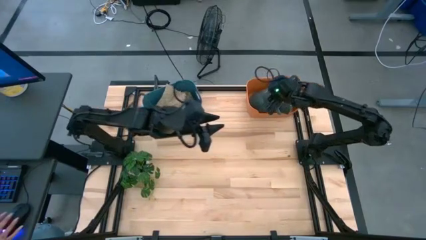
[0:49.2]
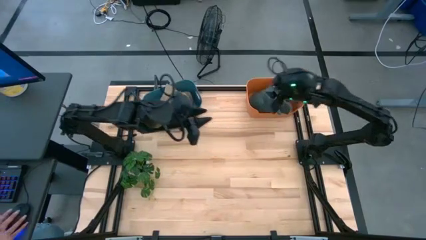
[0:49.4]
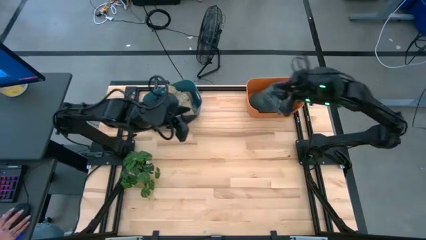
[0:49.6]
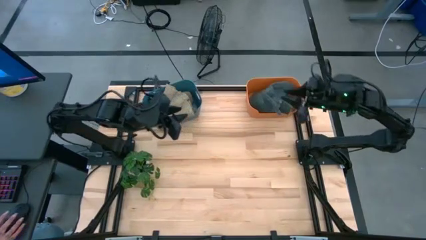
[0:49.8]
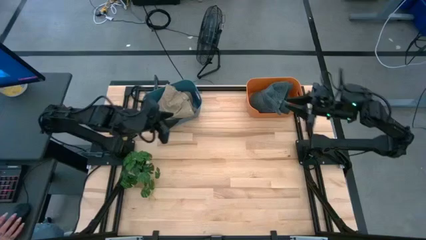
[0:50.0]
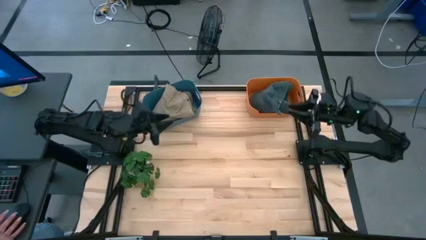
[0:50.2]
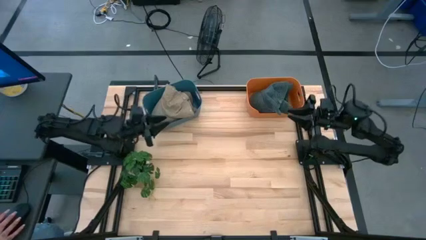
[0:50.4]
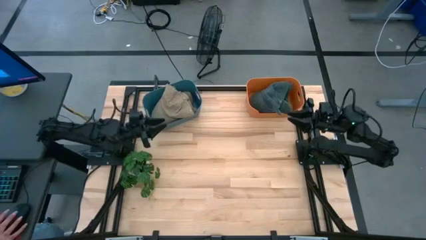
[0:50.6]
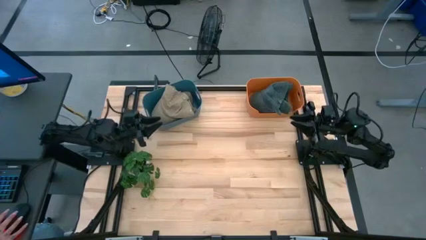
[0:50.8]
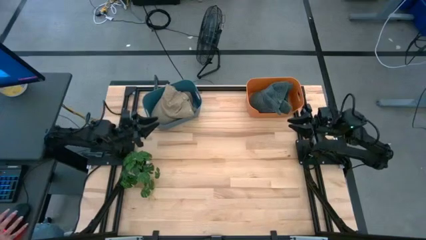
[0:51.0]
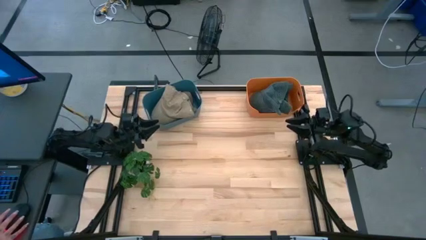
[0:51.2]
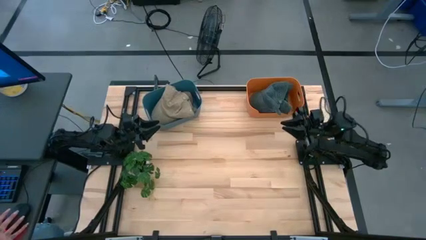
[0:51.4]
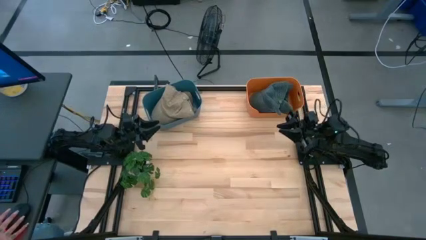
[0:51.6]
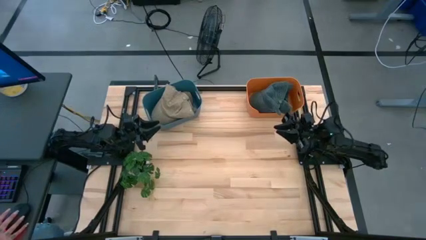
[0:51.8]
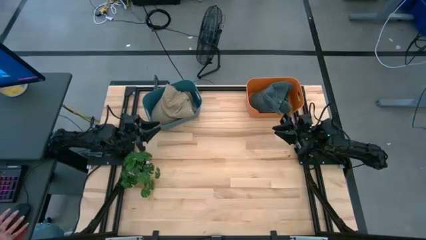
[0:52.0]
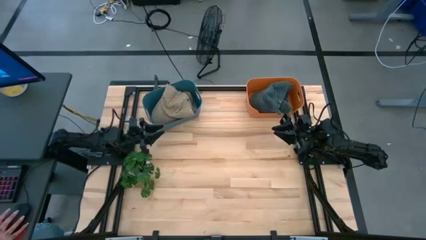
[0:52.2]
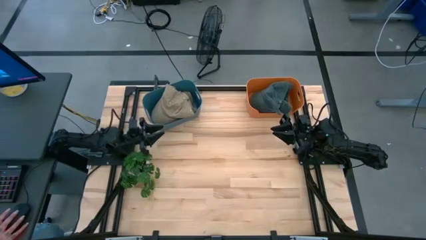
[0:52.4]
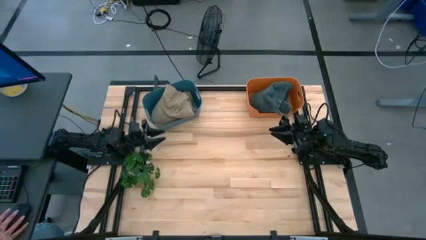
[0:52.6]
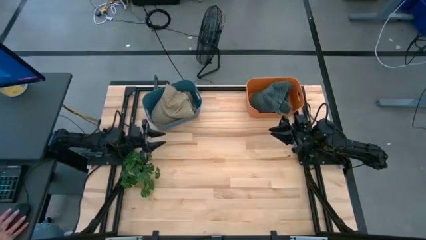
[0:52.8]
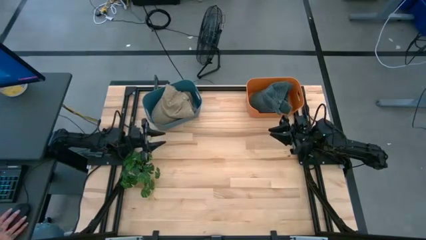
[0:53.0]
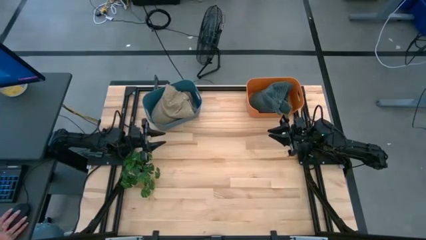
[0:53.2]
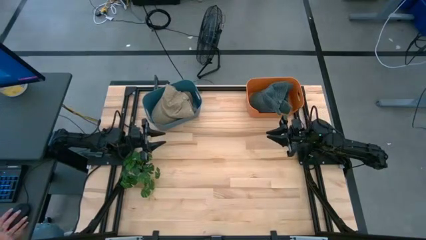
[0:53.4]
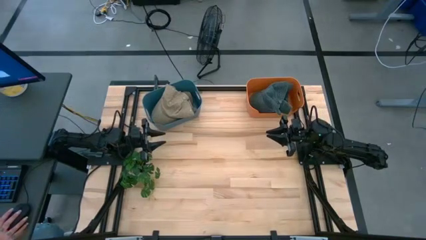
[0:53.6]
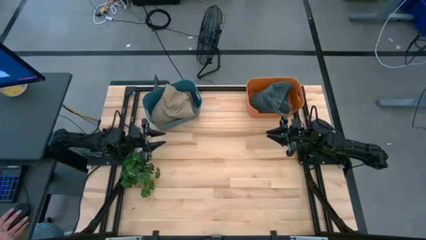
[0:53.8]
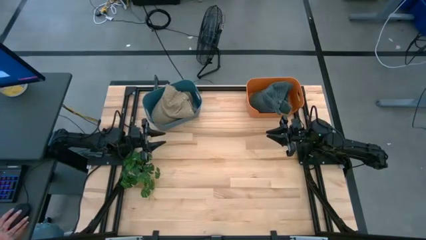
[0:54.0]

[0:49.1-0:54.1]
Task: Pick & Place hat
Return to Home Position

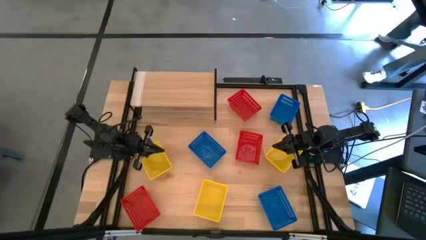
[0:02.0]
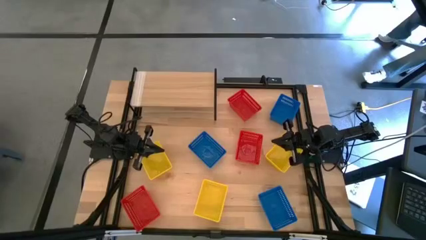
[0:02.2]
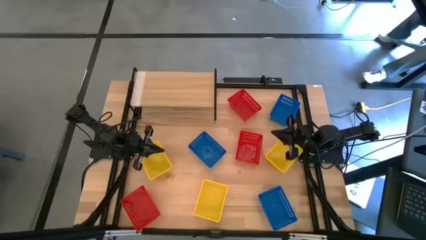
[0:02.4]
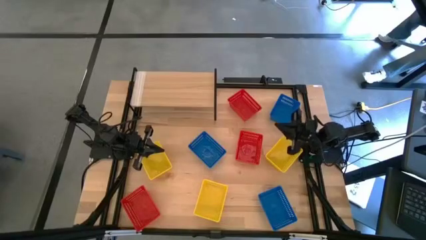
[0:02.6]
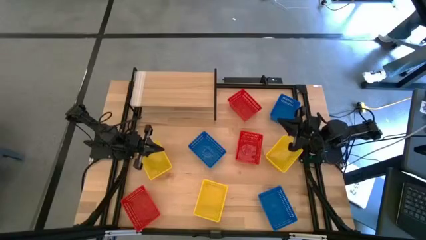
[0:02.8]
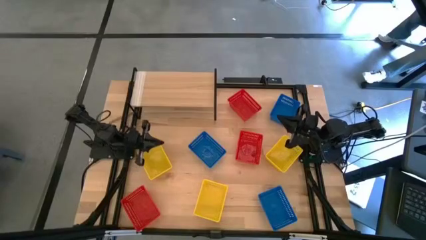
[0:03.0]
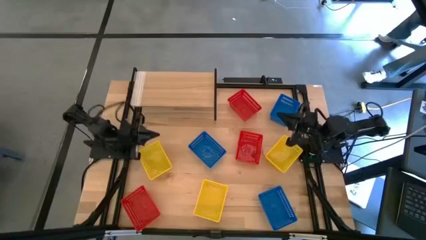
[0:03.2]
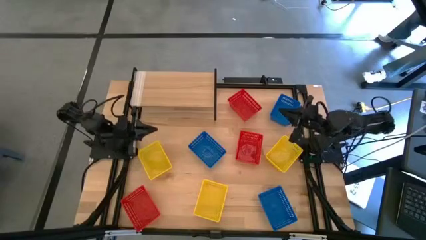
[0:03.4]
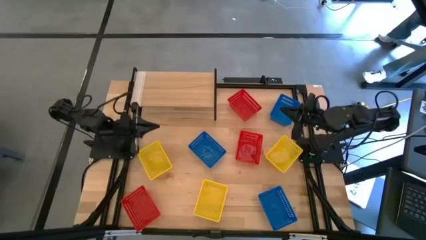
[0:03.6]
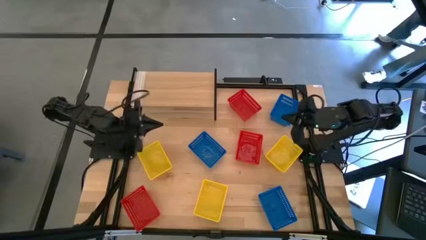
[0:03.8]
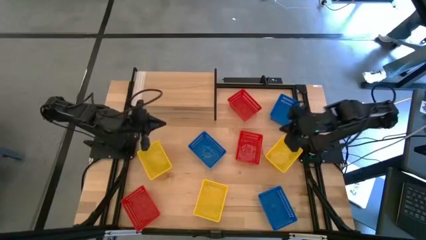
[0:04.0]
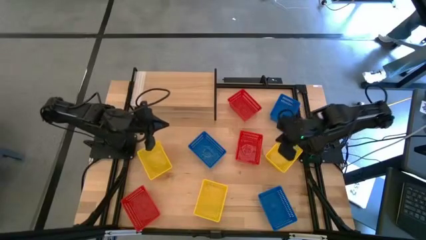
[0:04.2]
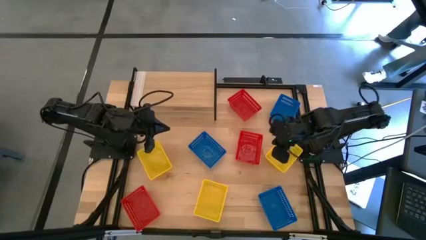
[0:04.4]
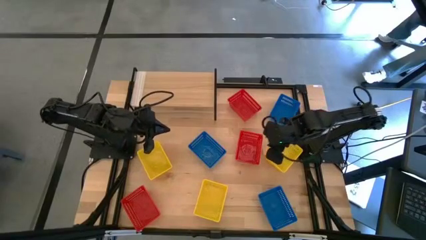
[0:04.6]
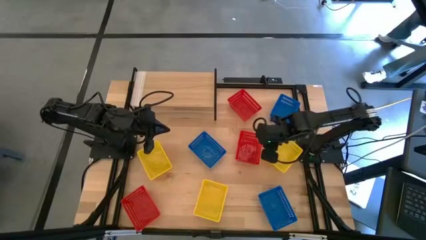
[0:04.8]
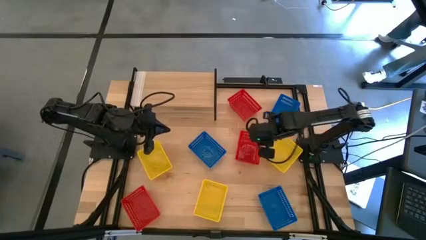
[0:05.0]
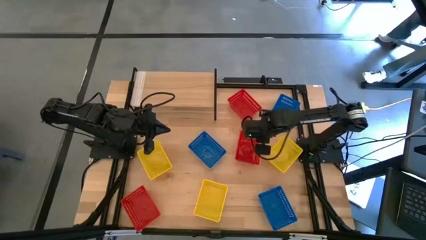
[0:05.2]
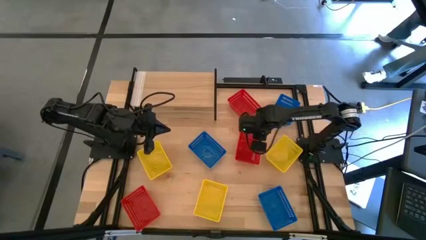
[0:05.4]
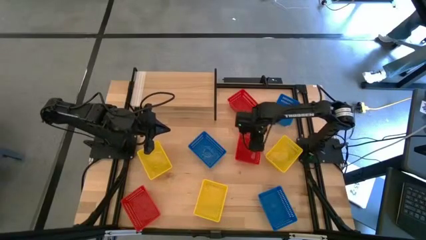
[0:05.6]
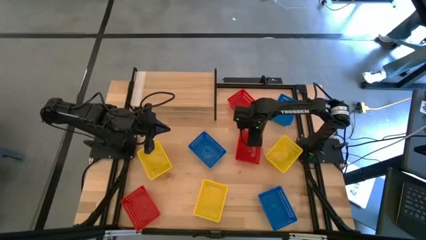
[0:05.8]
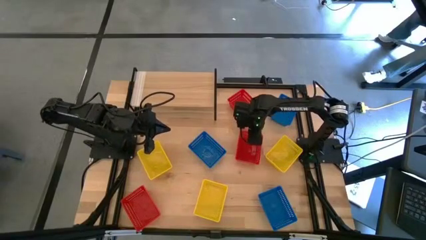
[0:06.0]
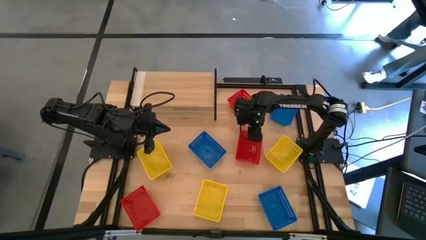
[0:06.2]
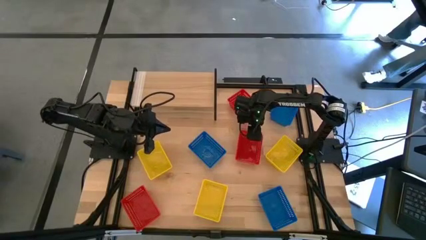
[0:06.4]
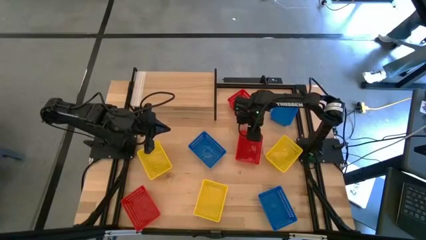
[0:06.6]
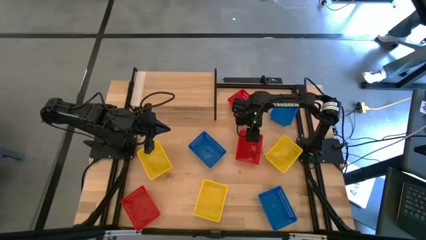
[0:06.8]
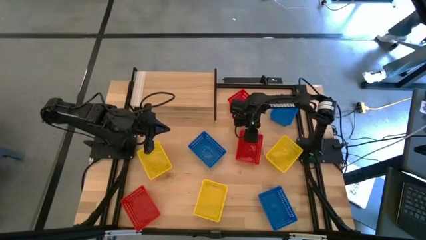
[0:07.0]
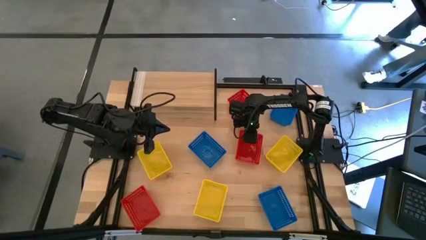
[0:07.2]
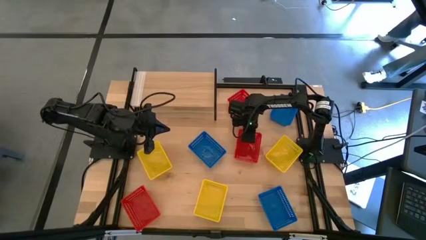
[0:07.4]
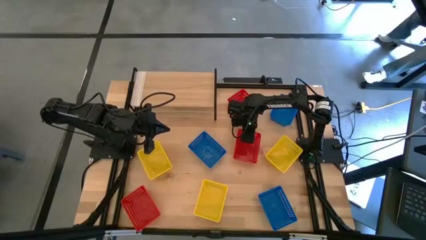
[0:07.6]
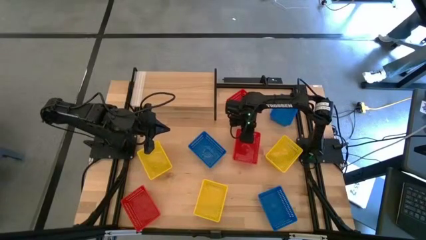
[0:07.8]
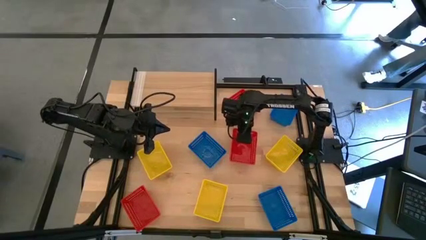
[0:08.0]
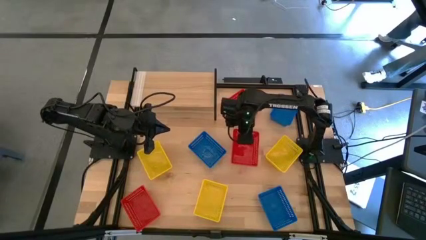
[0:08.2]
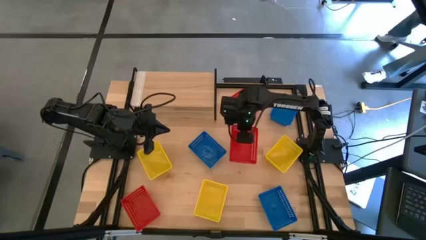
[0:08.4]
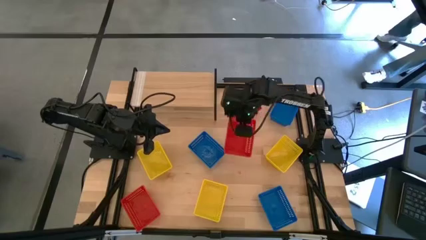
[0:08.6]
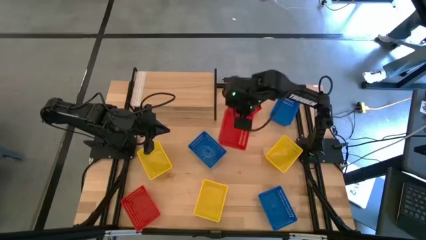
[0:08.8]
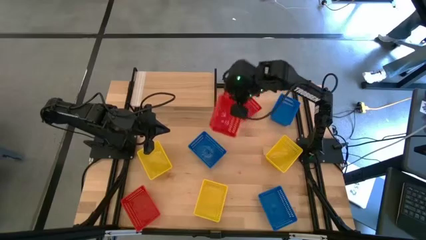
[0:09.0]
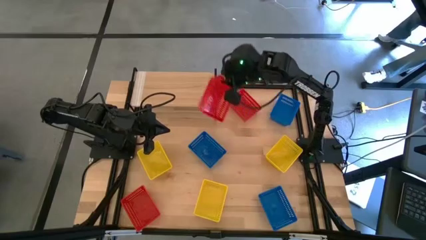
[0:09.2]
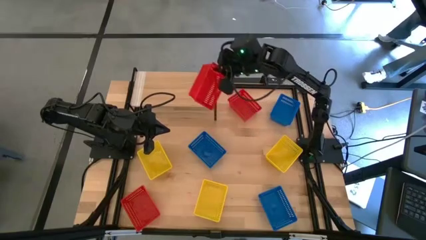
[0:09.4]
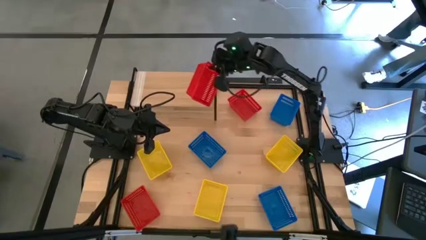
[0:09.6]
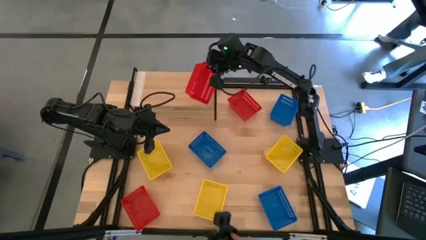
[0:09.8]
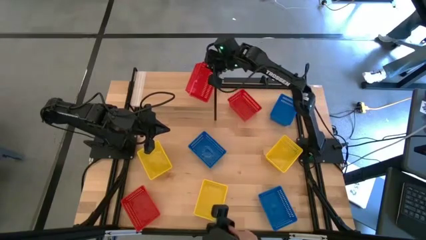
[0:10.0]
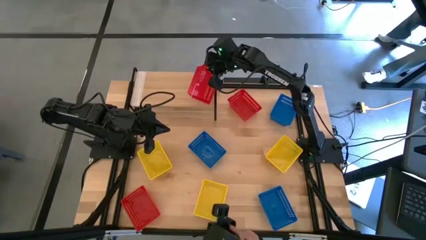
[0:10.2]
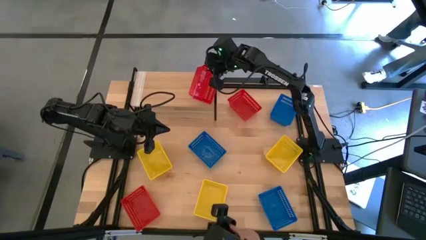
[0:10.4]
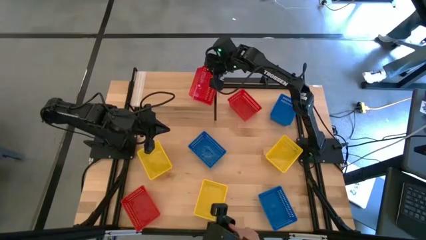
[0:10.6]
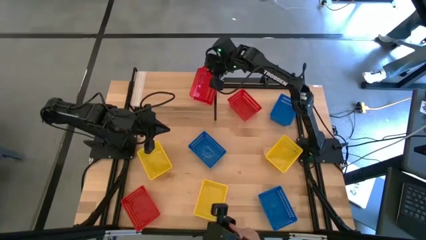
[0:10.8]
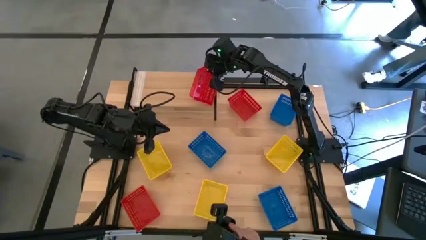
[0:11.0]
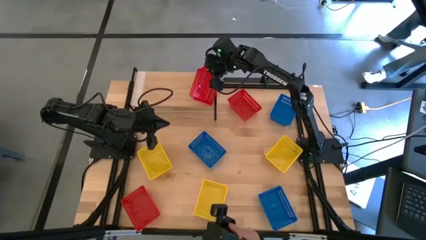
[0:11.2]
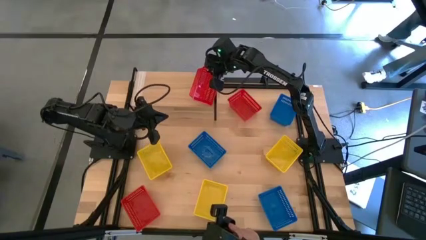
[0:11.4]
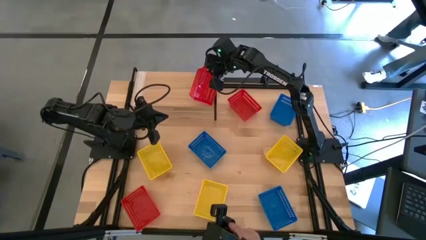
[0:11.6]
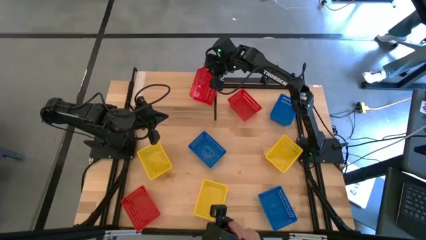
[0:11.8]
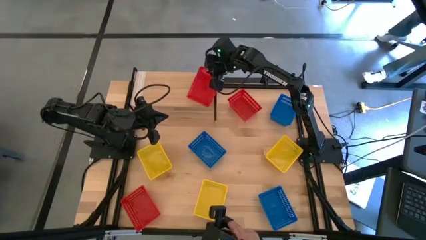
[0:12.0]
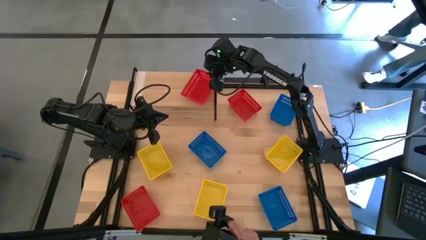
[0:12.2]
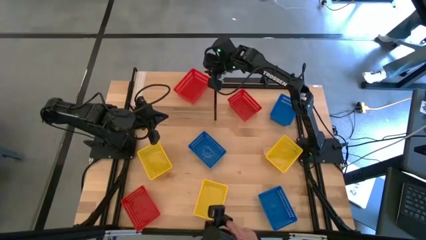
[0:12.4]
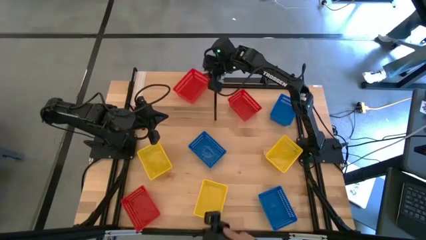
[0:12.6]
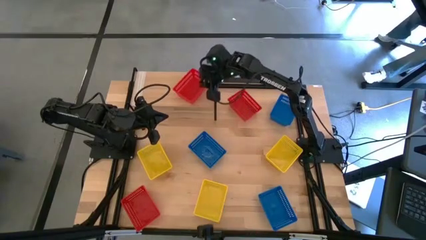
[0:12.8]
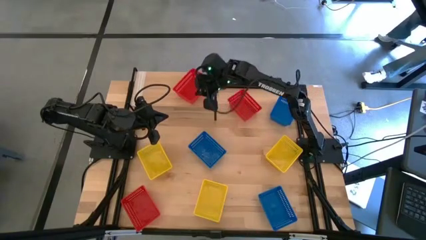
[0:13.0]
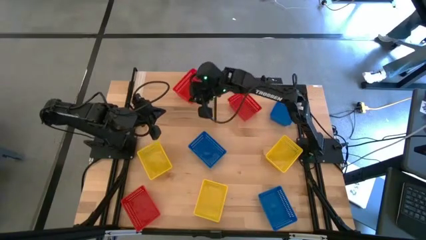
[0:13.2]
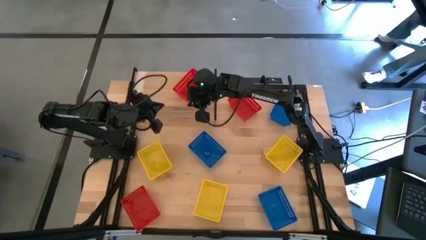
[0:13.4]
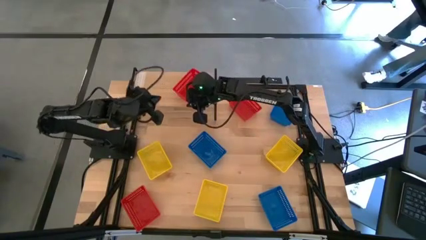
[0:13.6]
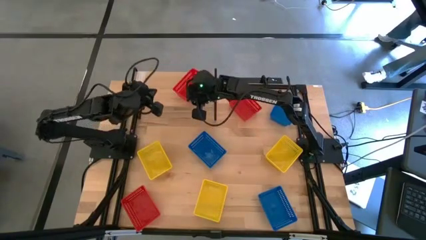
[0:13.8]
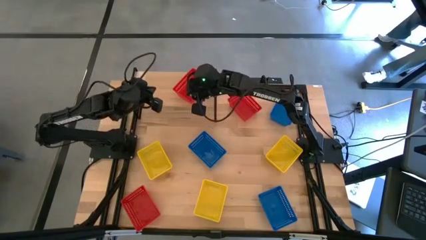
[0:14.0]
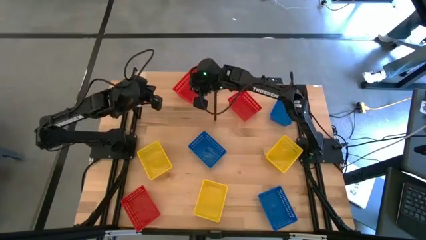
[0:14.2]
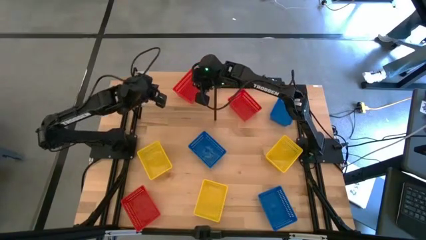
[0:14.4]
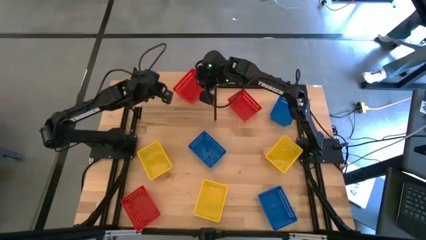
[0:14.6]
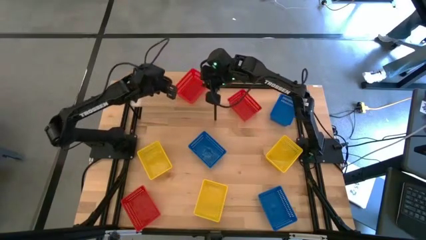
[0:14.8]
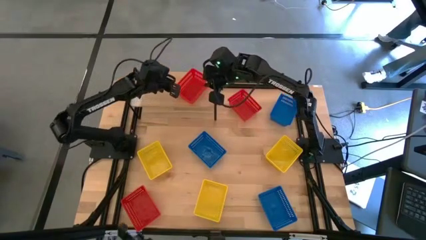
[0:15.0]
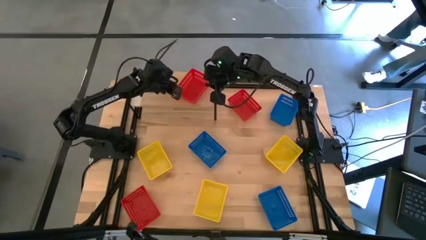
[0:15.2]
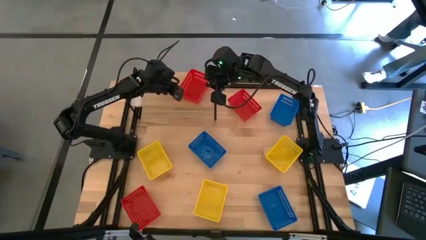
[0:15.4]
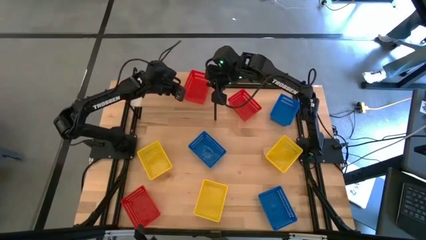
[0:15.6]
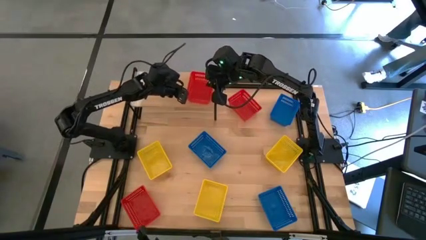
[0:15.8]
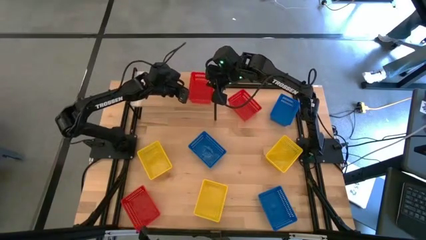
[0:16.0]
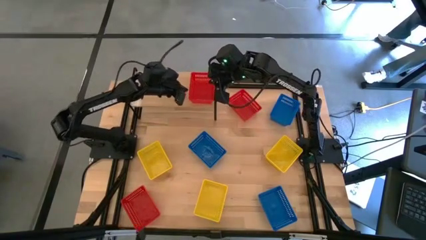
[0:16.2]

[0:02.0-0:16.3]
Task: Stack baskets on shelf by color
Put the middle red bin on the shelf
